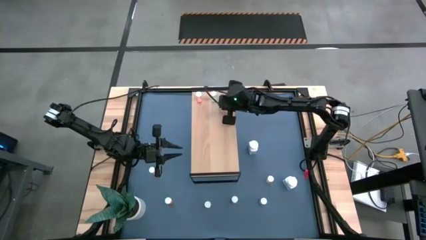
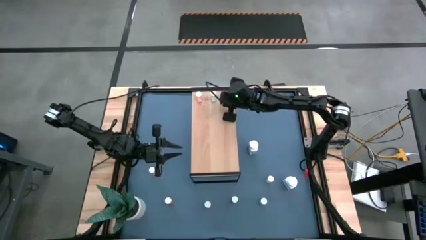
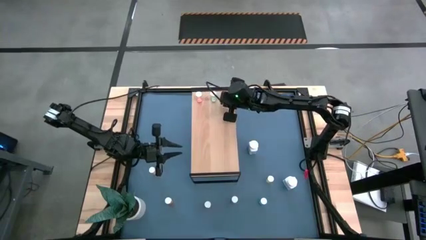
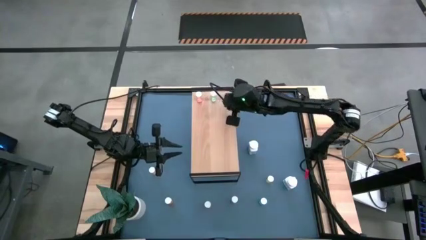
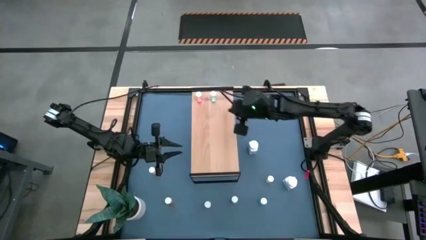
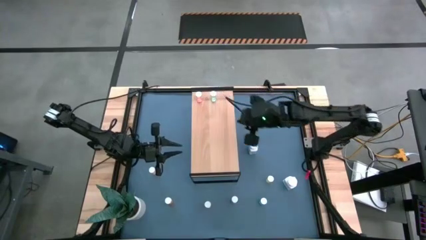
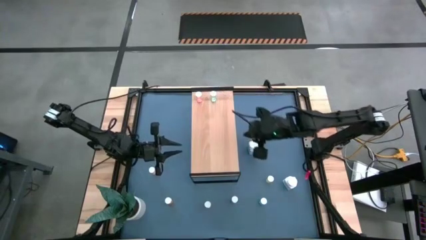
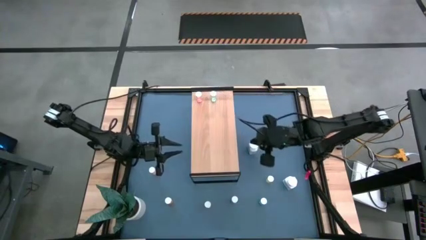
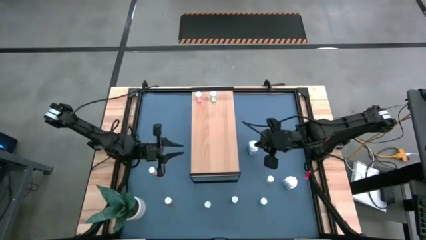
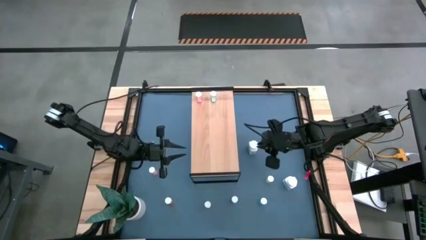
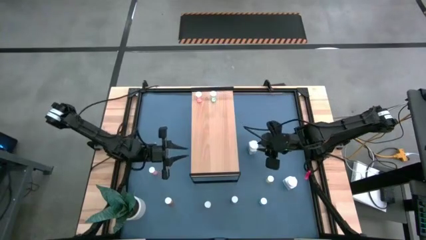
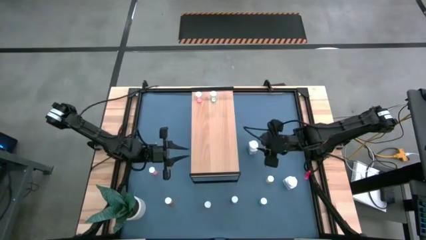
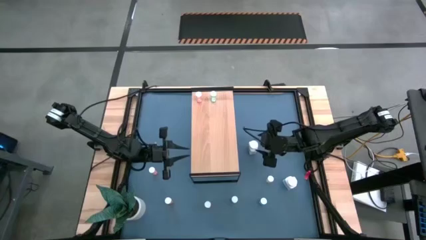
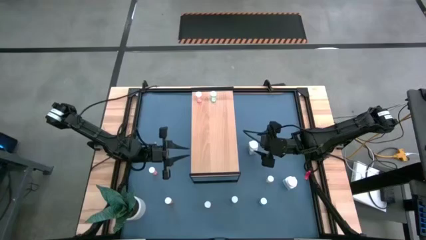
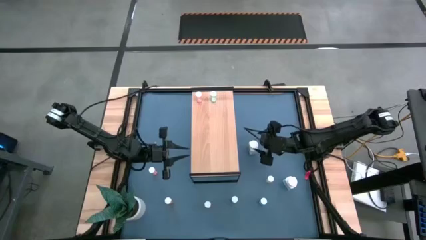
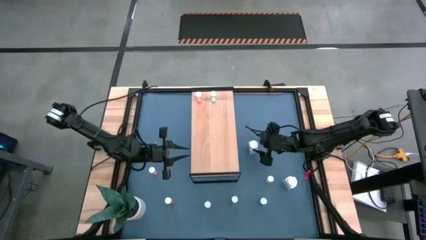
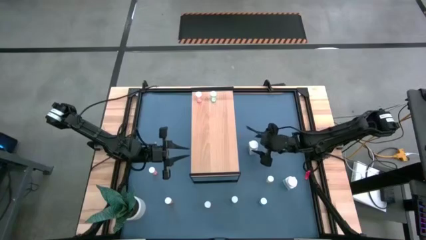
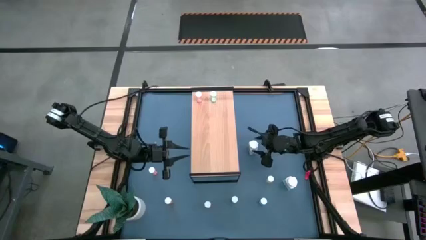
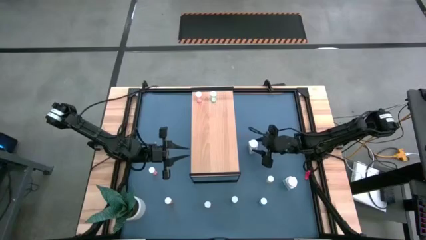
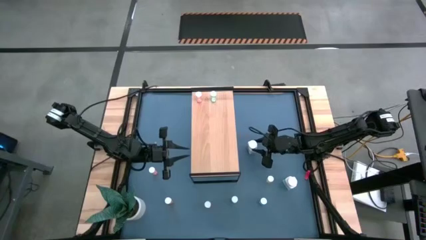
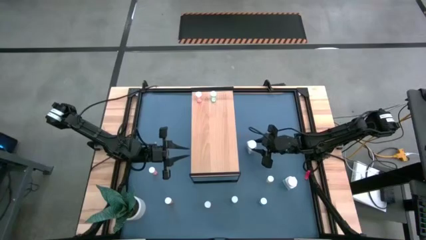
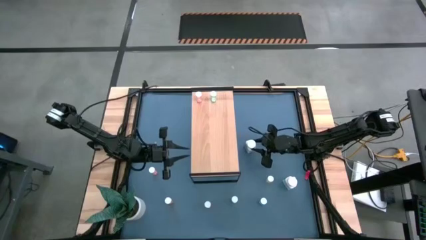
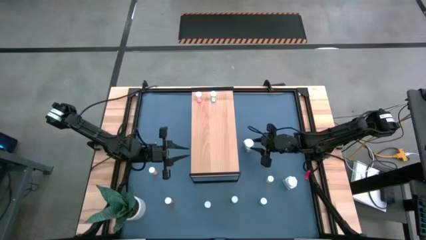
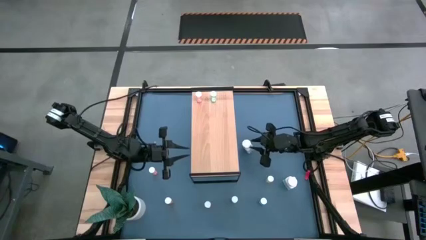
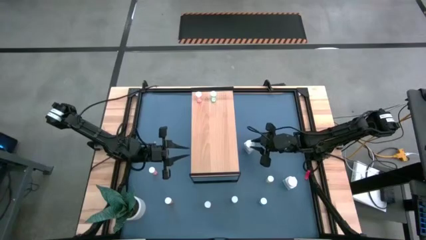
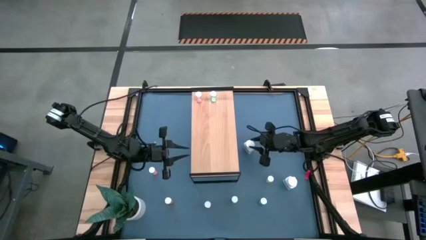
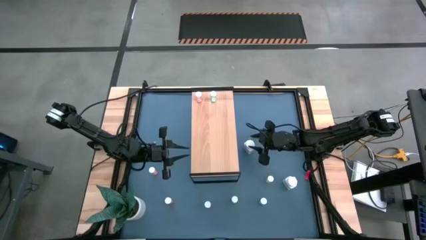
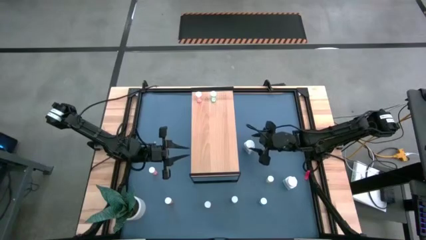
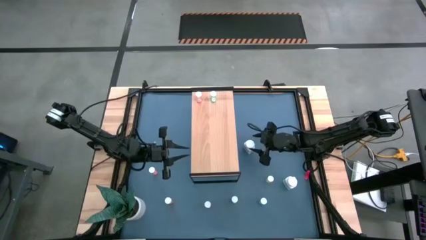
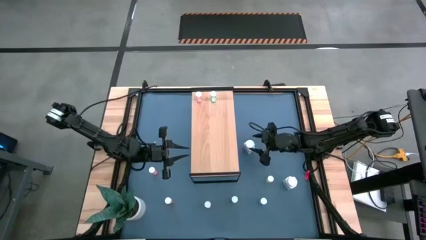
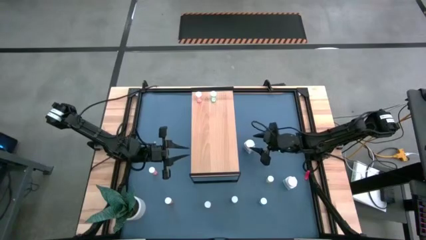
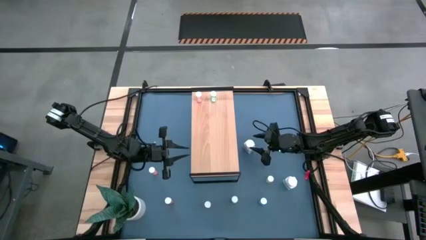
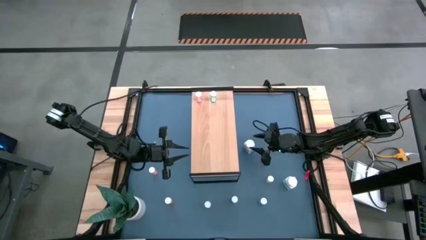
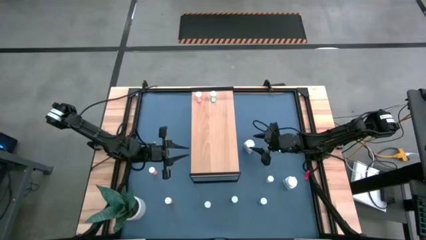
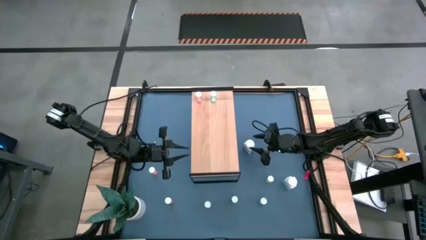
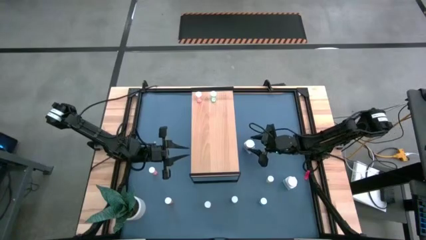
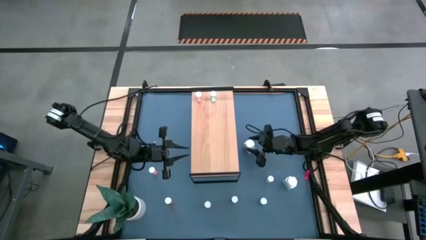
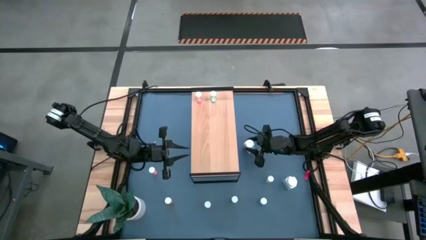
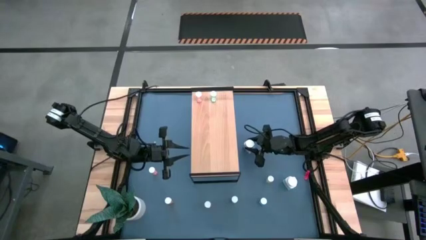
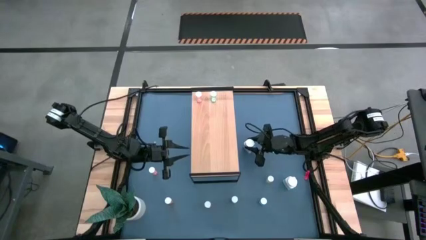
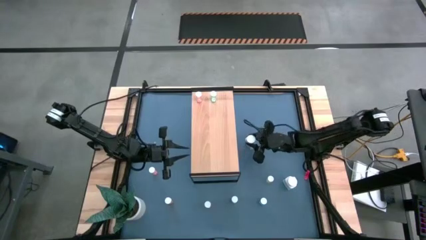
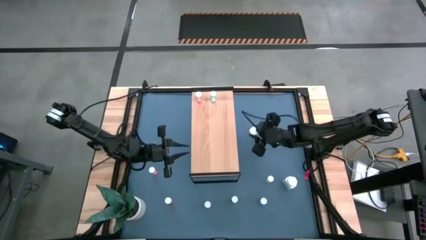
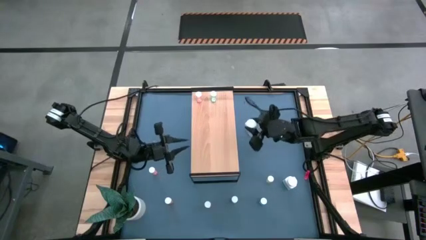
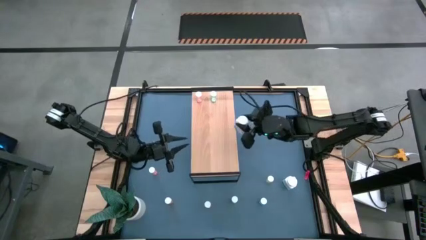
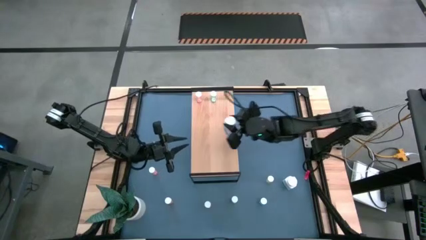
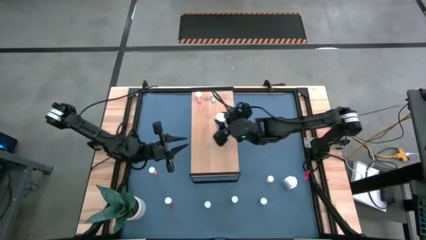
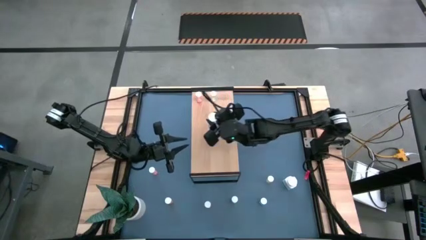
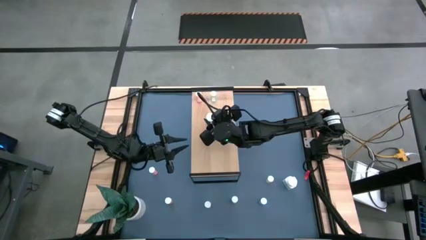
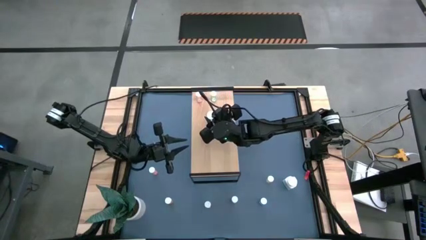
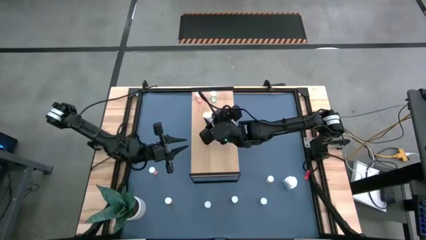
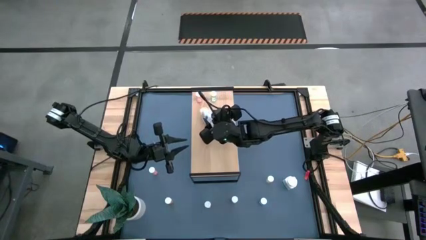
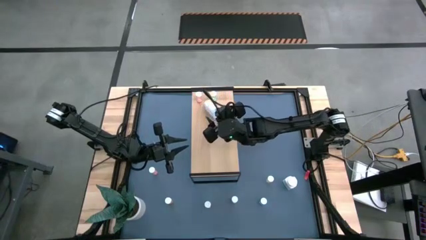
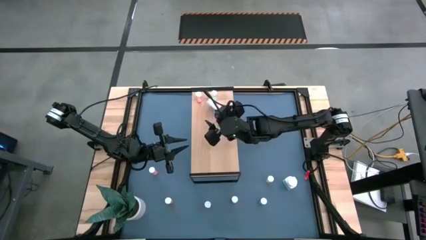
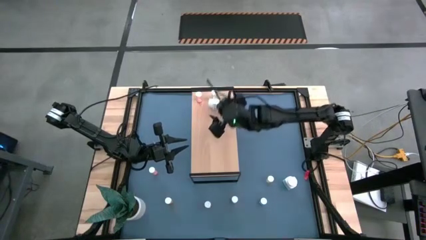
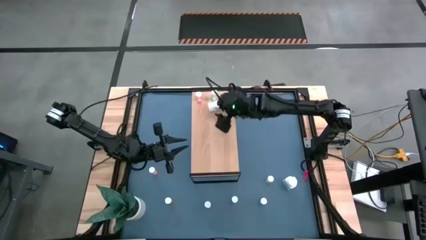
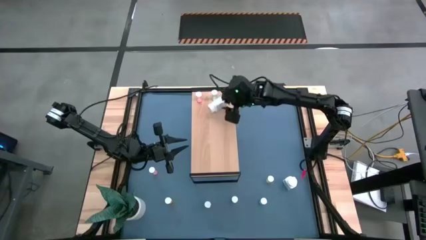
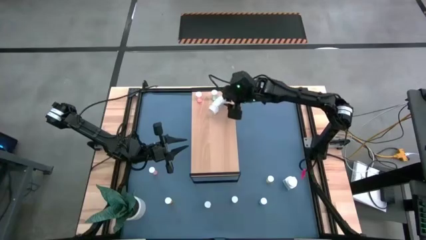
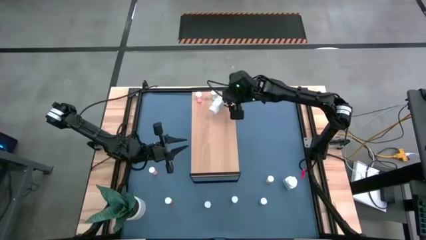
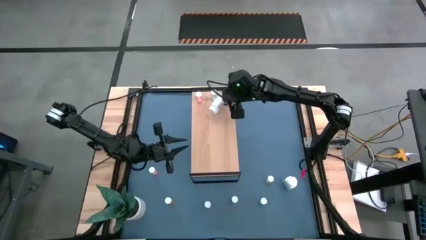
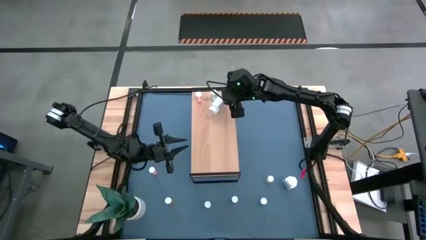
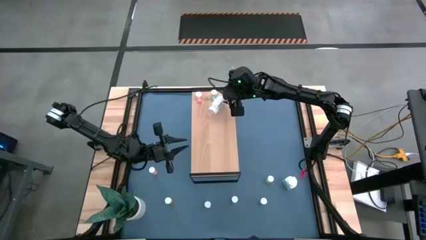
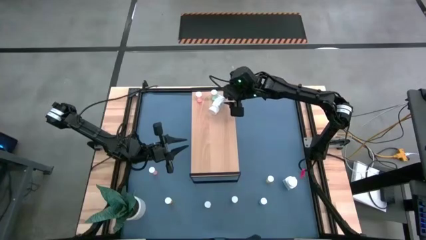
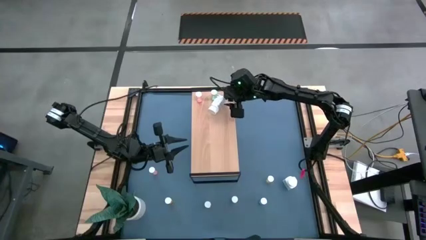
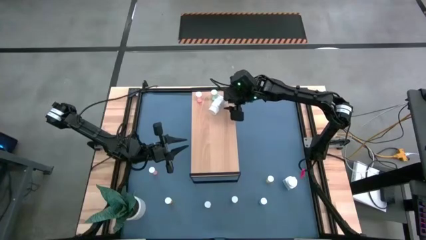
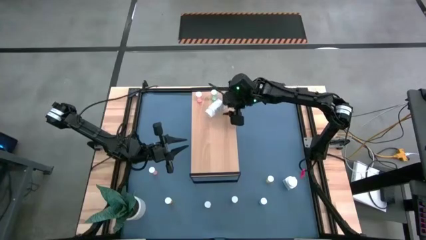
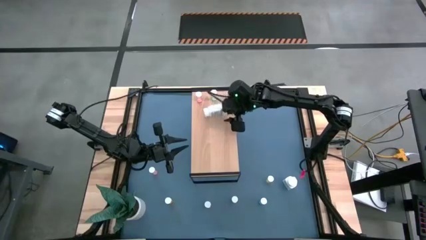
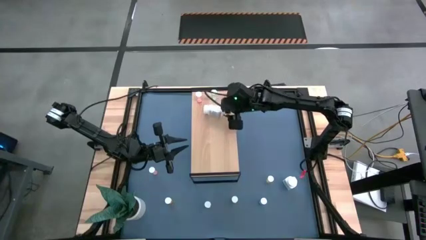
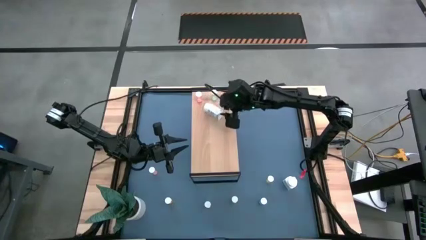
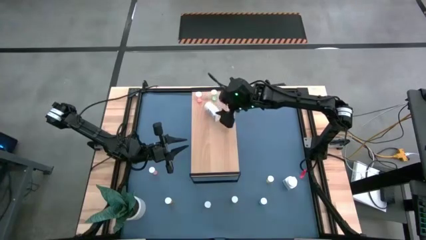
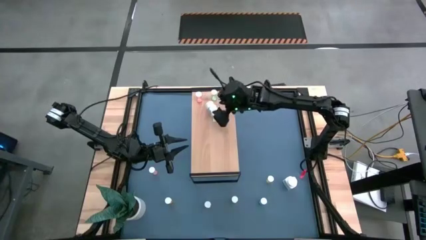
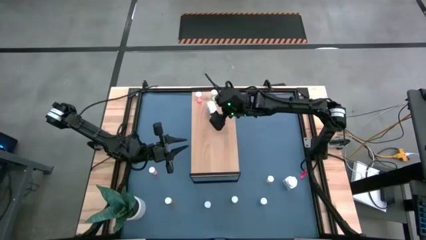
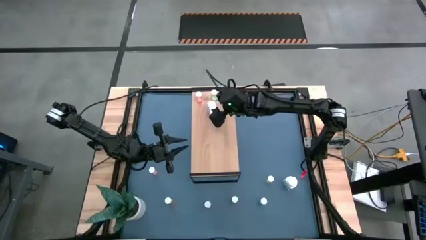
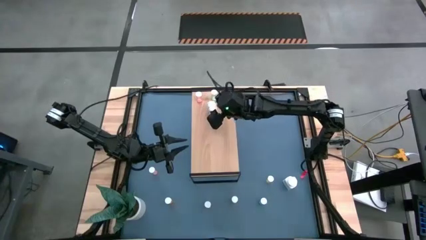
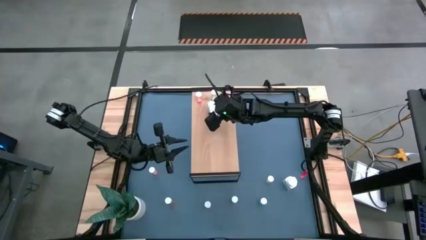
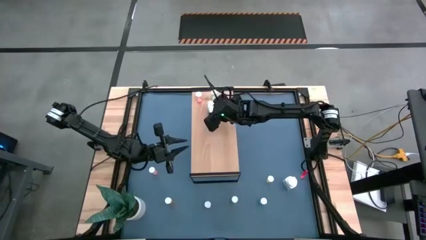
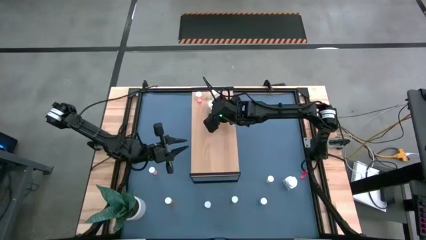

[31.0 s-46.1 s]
Task: Pick and place medicine bottles onto shelf by color
Put the white medicine bottle on the shelf
